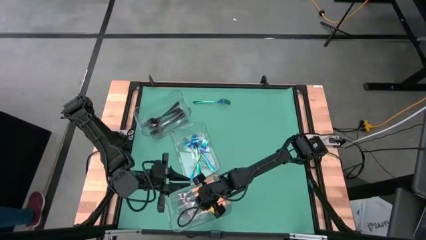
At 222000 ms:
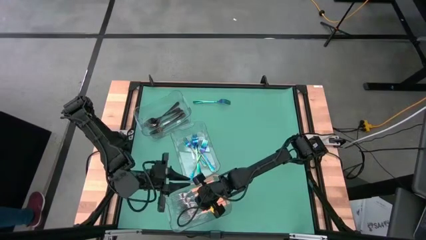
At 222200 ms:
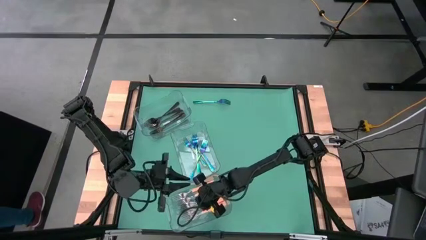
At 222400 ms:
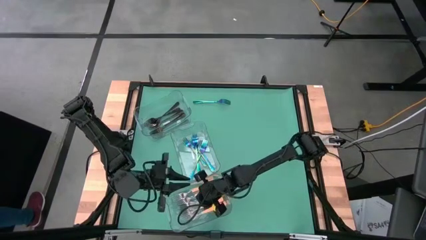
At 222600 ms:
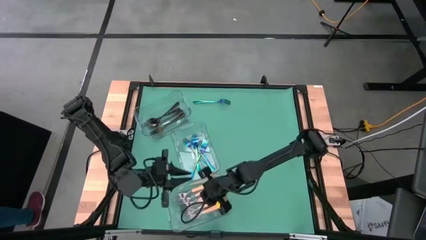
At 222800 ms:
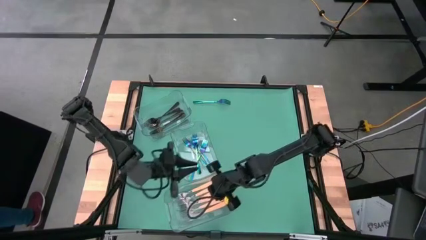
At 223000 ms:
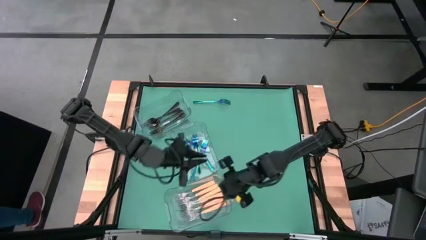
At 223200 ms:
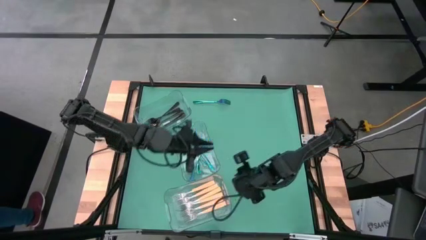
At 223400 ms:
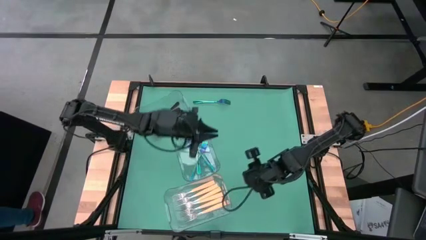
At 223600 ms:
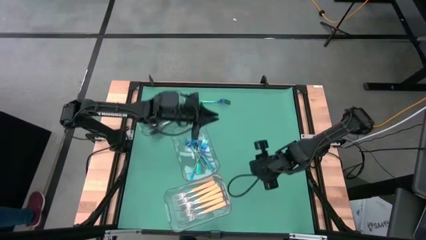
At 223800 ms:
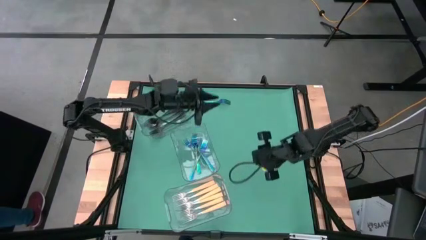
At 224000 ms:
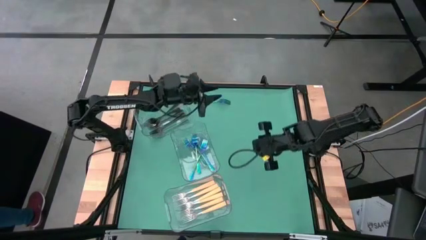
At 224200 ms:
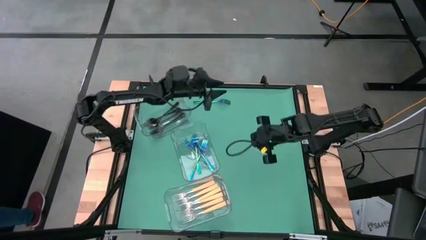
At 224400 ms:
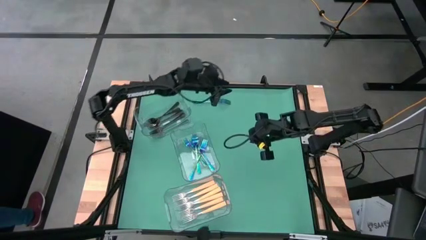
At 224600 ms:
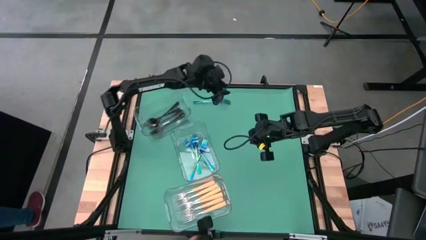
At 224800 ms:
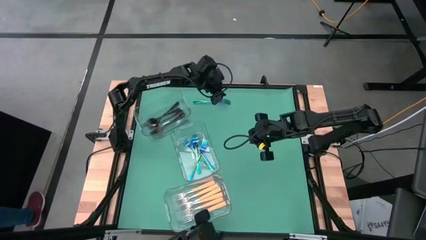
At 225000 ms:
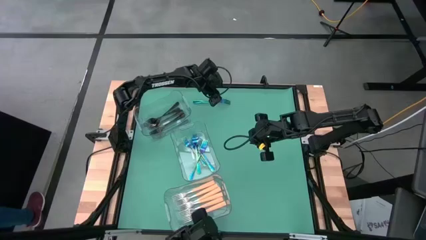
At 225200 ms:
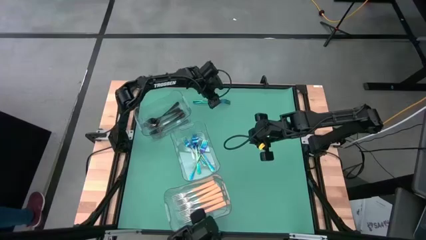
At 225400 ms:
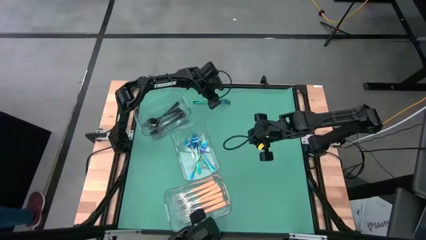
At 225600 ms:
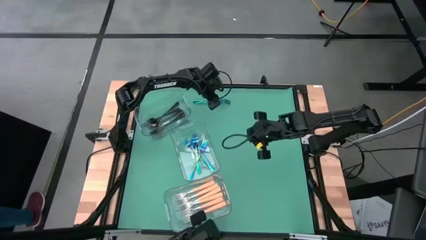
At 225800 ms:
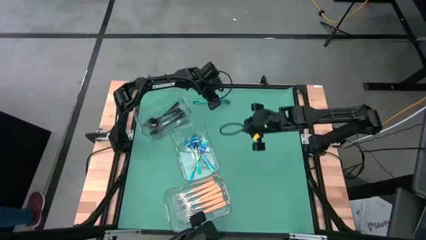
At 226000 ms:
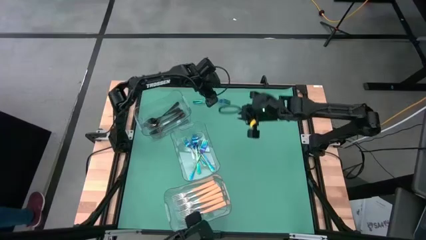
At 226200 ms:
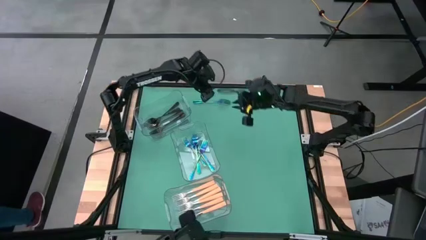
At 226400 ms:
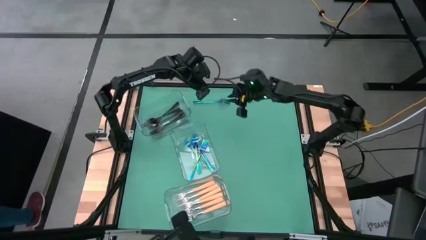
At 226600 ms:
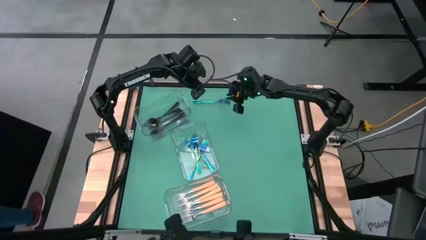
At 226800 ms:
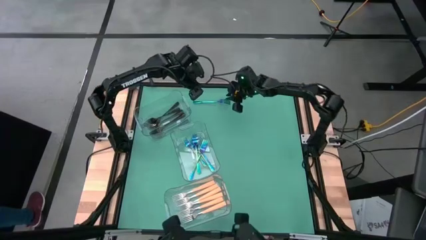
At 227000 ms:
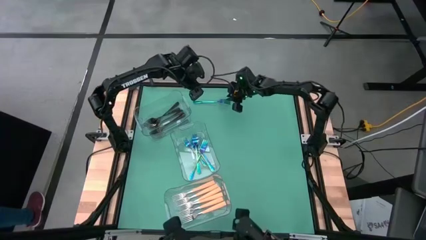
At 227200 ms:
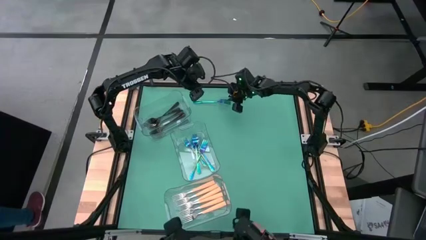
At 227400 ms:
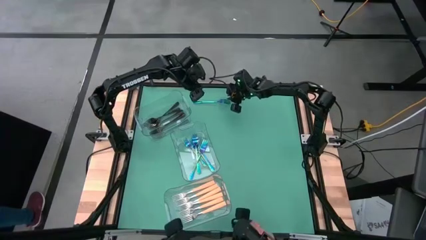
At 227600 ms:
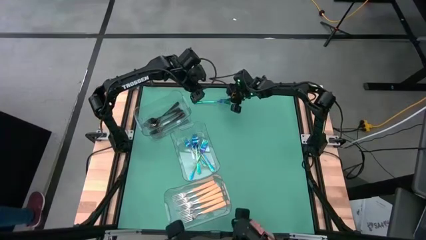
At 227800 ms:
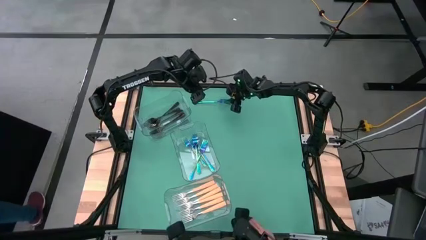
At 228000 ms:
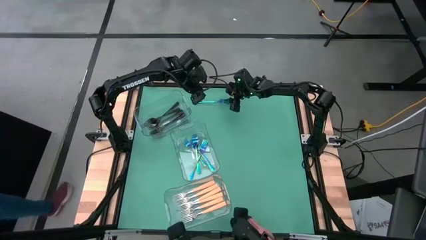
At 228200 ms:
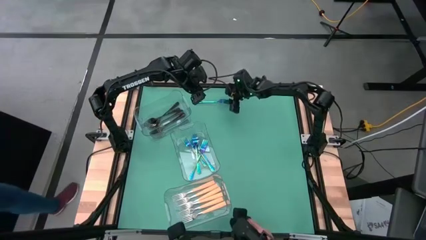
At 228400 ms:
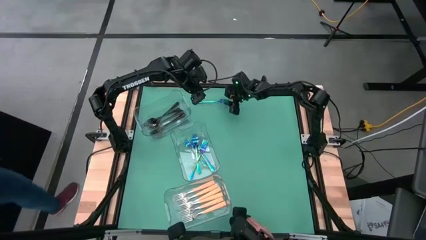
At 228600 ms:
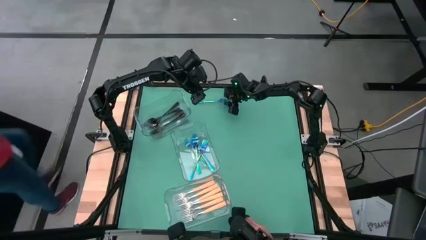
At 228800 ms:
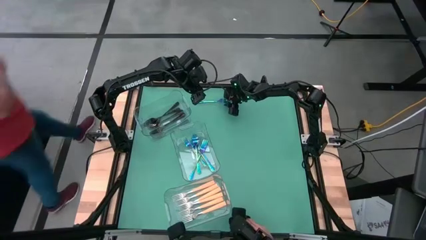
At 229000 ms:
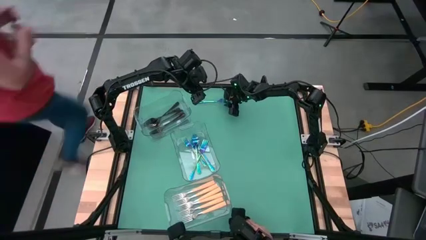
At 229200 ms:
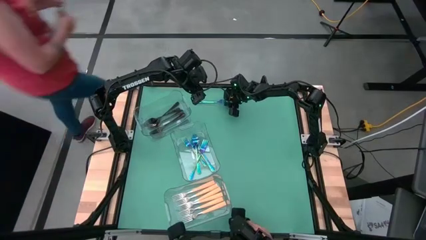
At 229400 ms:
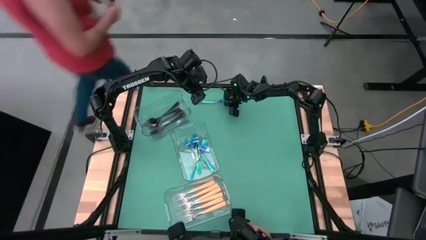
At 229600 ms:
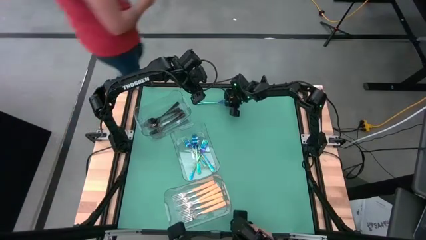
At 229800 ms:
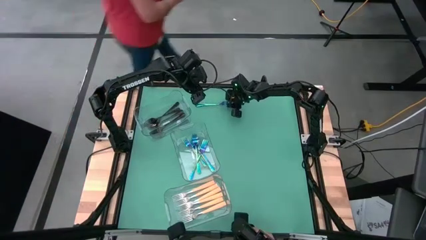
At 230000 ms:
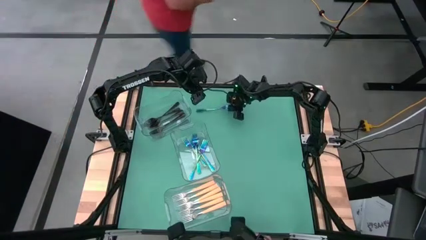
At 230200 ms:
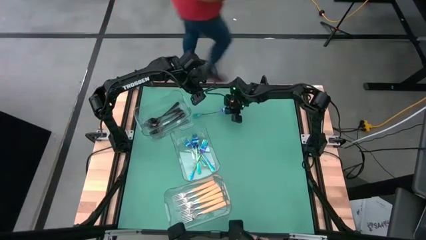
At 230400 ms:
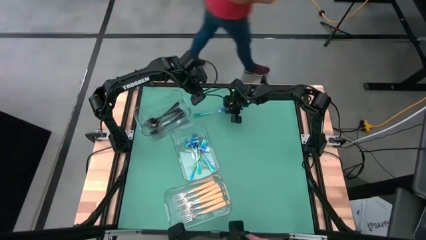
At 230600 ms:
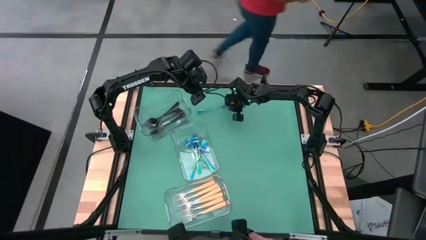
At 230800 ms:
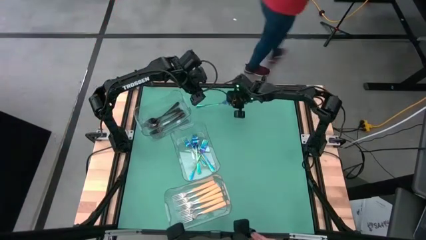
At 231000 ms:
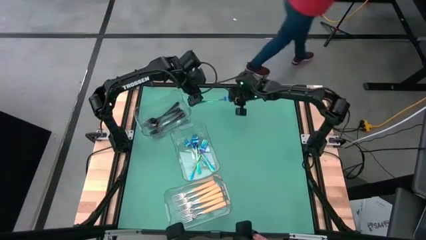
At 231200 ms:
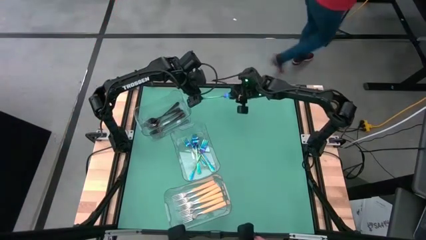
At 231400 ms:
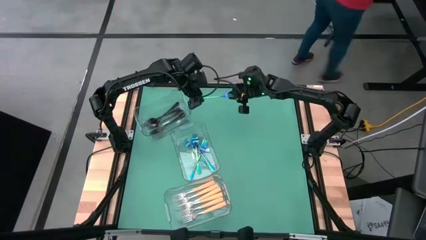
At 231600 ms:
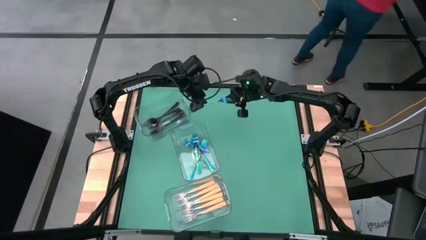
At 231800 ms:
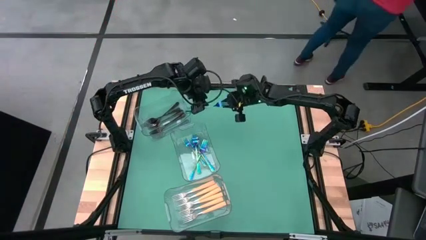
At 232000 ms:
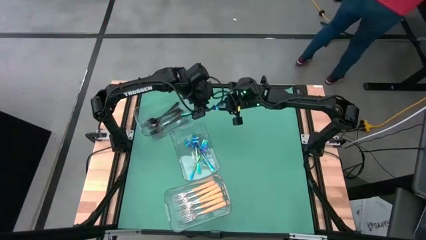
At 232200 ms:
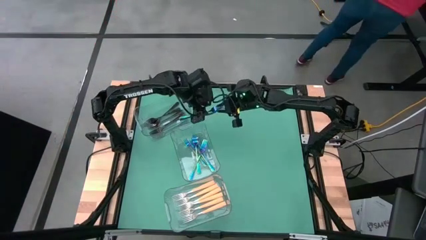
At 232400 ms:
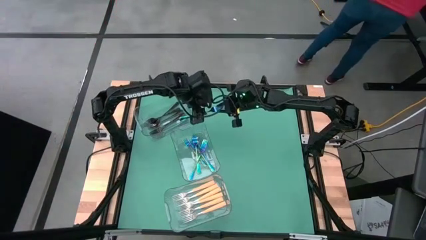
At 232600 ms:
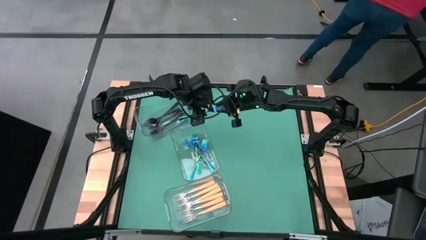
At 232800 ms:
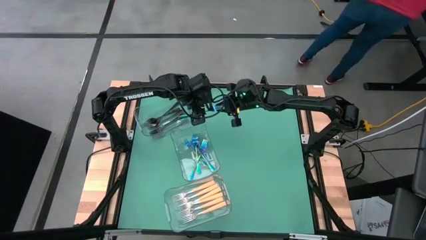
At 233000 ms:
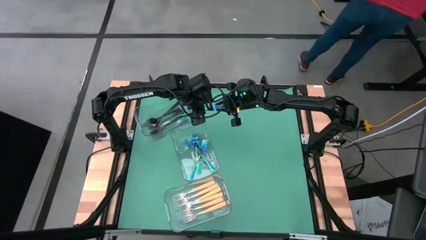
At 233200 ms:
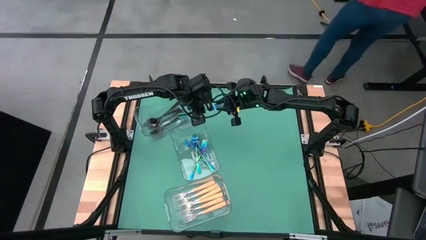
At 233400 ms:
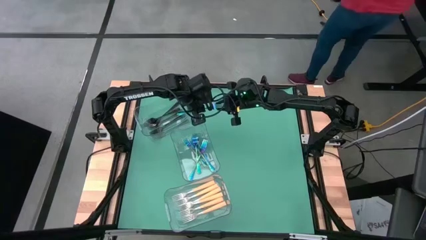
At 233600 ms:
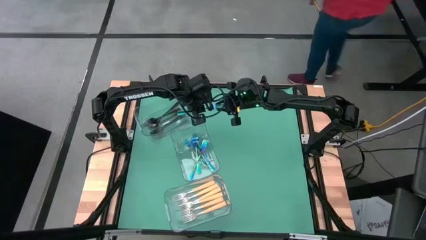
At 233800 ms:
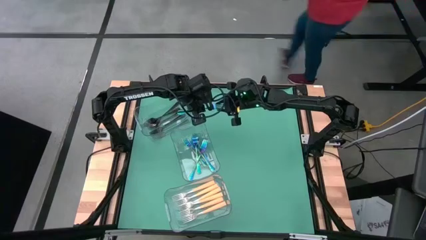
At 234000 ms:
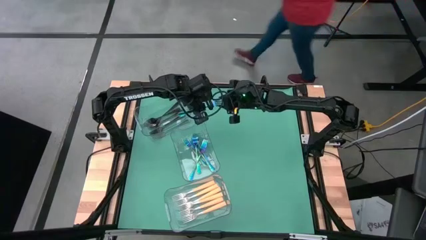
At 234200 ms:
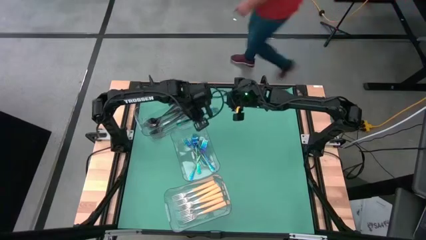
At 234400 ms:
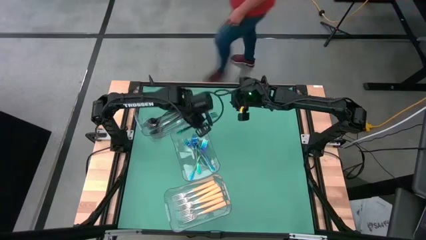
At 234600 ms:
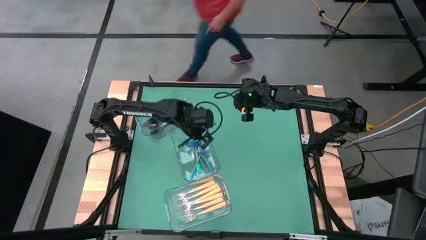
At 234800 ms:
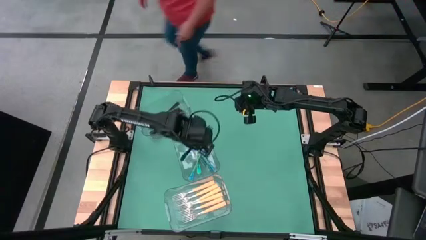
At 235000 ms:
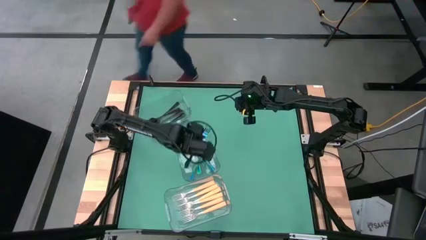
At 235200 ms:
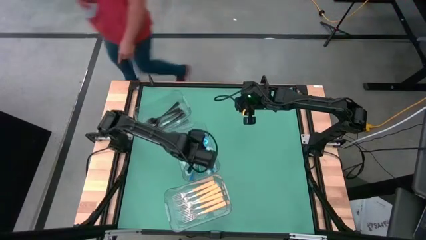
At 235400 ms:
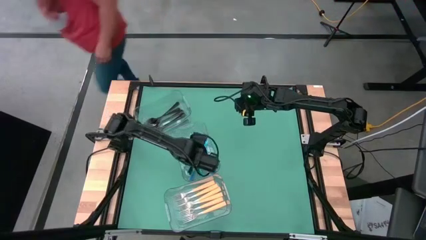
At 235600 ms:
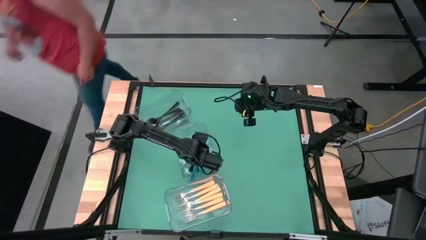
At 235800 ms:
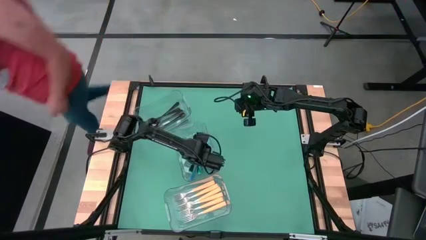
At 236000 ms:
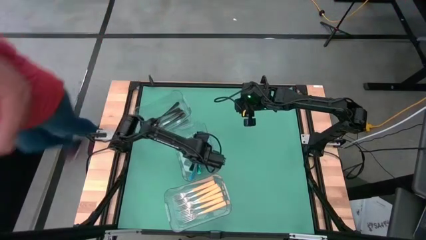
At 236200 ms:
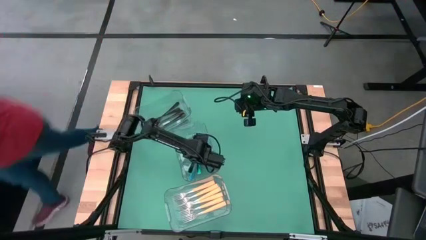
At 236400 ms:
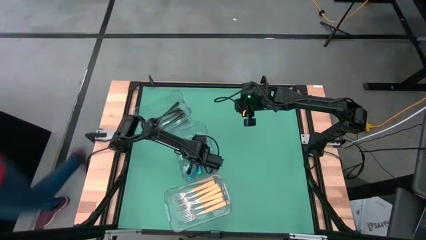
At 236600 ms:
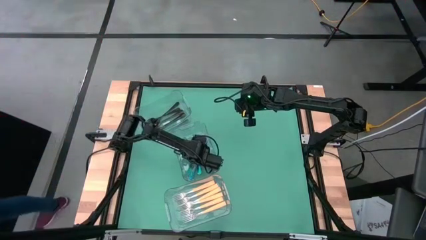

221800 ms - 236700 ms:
Task: Sort silverware by color (type)
Put the blue fork into the center transparent bin

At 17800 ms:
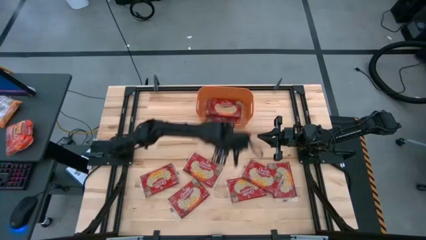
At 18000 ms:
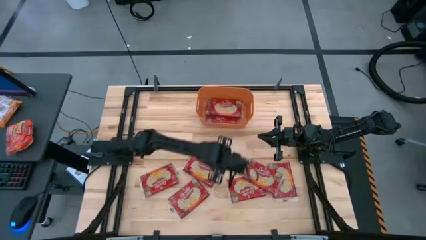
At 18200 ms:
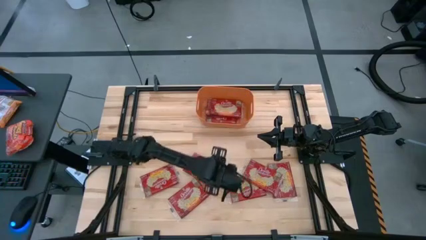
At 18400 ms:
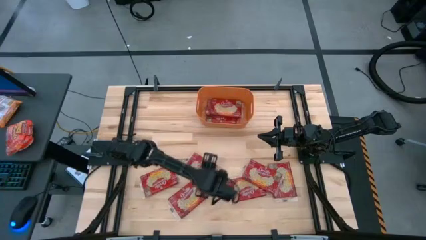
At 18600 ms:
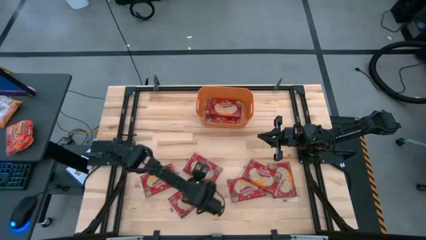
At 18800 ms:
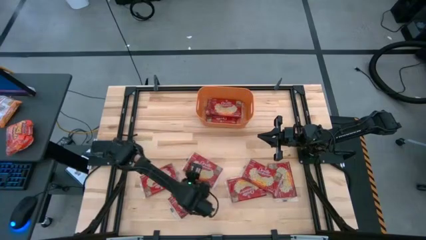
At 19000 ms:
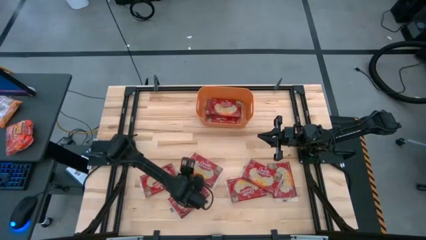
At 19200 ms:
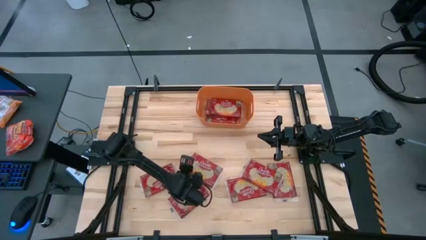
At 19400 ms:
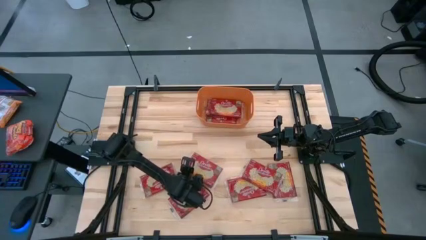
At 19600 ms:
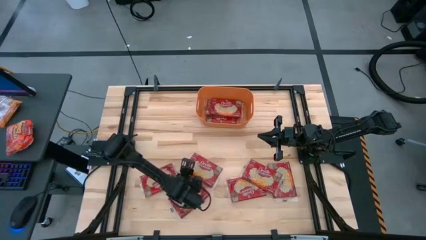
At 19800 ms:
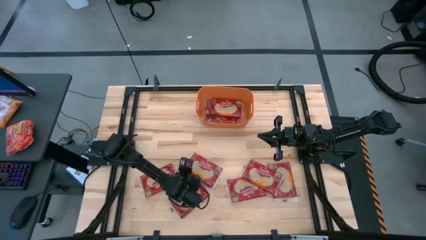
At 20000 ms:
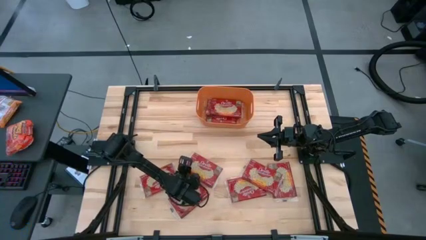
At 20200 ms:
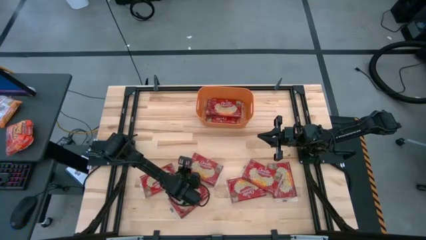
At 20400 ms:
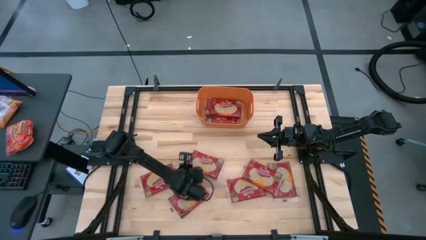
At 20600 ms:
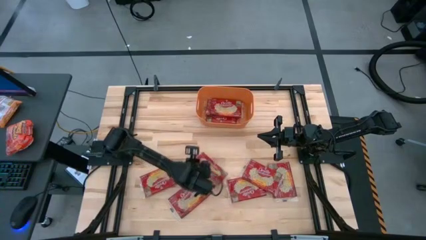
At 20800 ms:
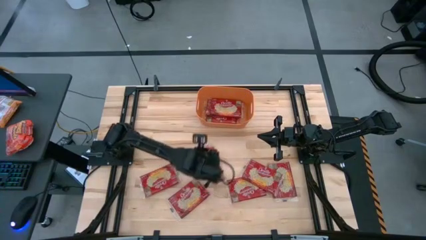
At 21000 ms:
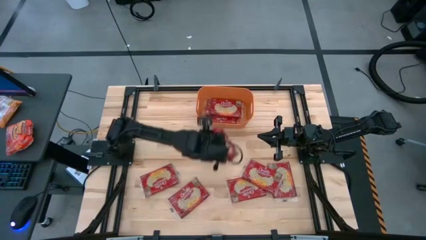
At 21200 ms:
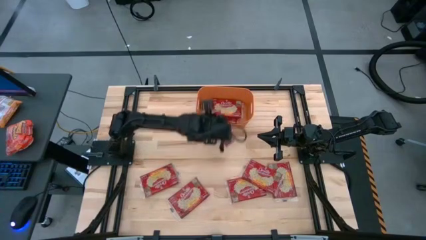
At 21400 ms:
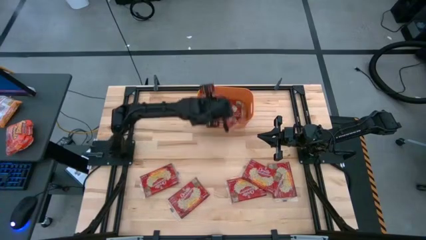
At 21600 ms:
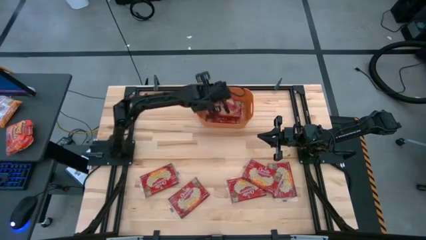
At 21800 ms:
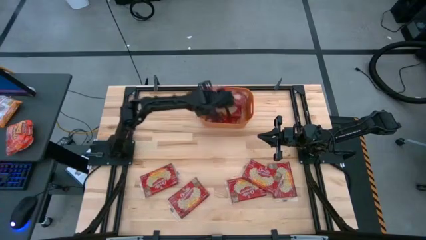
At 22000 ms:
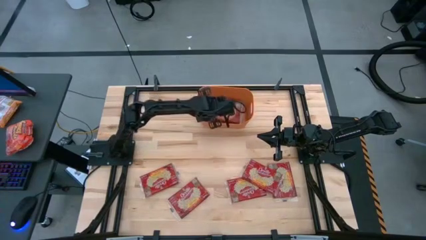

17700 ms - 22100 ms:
Task: Sort popcorn bags into baskets
Put the red popcorn bag into the orange bin
